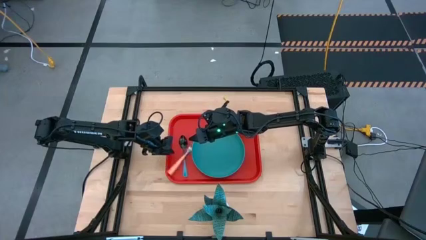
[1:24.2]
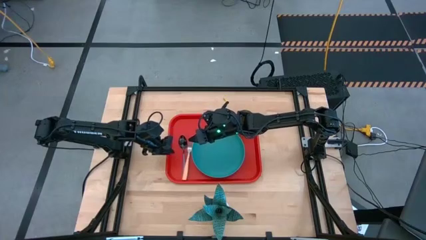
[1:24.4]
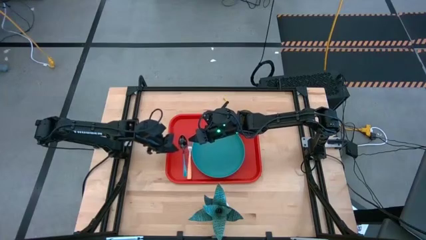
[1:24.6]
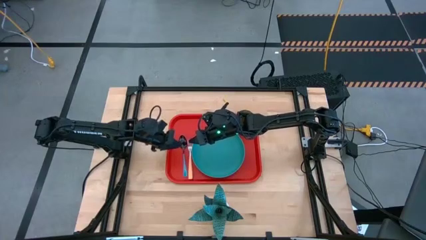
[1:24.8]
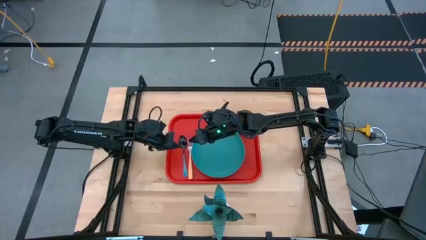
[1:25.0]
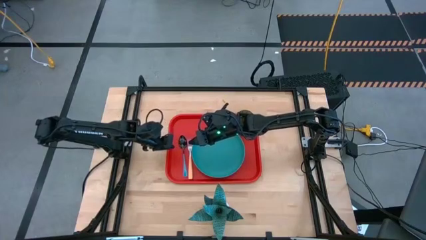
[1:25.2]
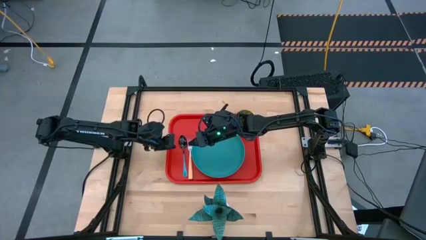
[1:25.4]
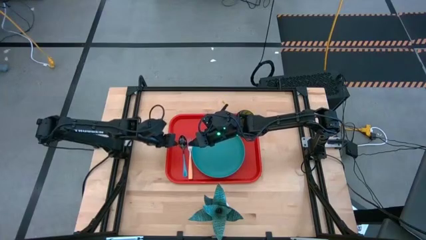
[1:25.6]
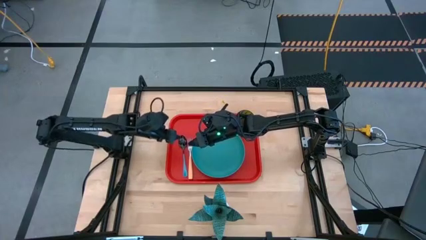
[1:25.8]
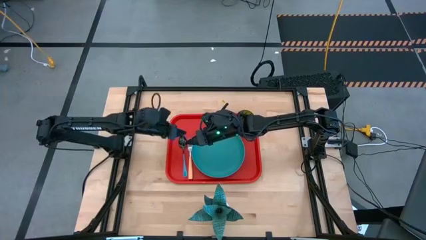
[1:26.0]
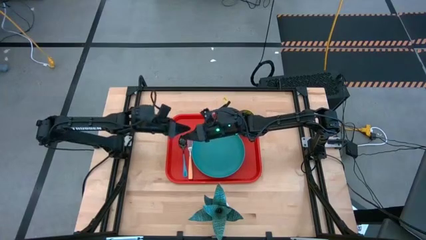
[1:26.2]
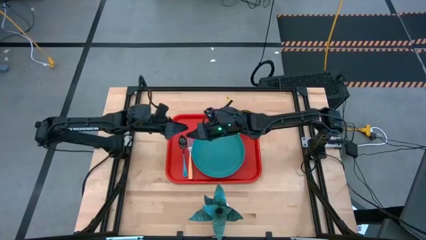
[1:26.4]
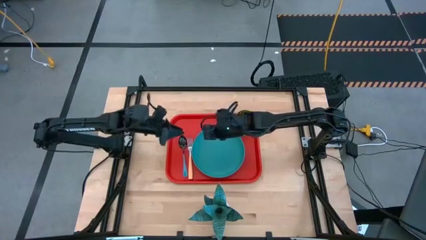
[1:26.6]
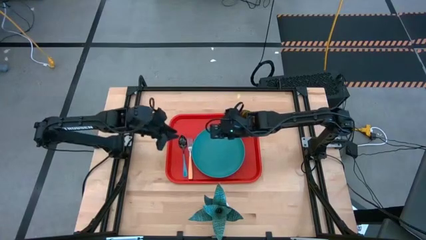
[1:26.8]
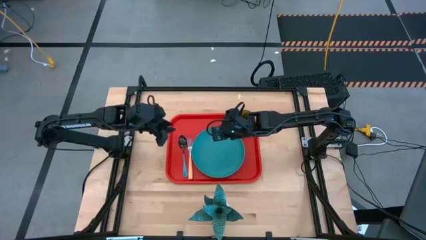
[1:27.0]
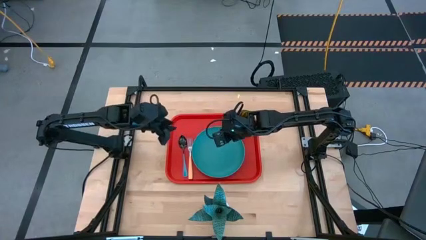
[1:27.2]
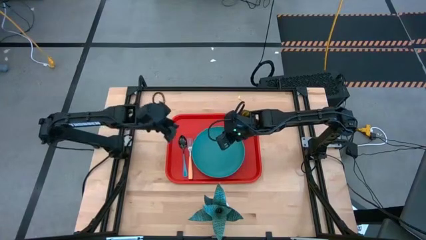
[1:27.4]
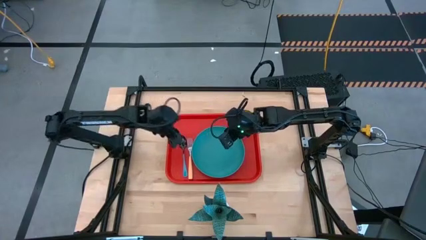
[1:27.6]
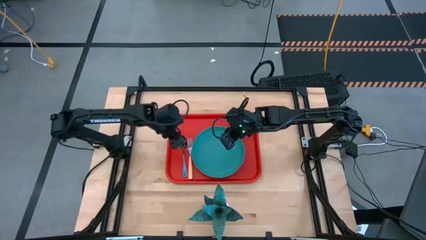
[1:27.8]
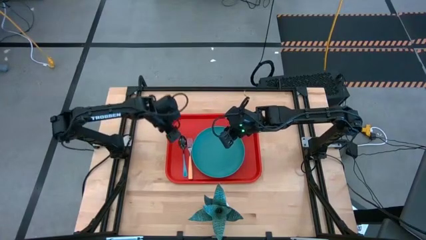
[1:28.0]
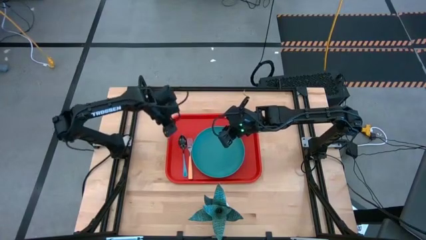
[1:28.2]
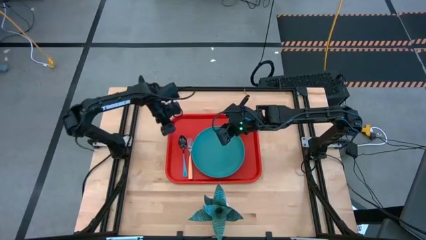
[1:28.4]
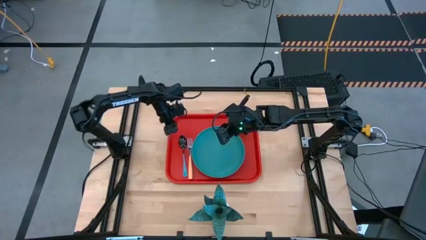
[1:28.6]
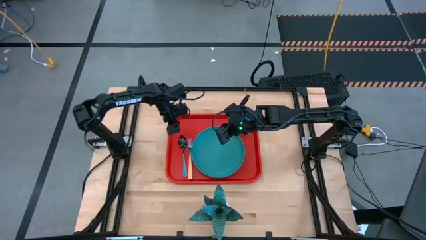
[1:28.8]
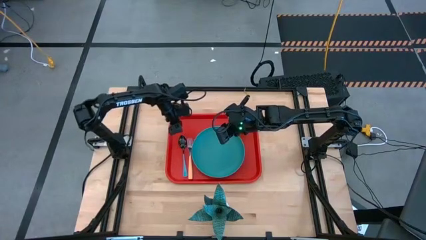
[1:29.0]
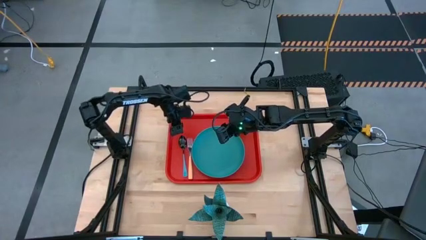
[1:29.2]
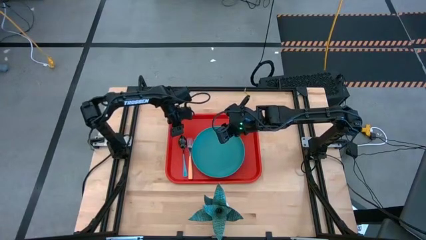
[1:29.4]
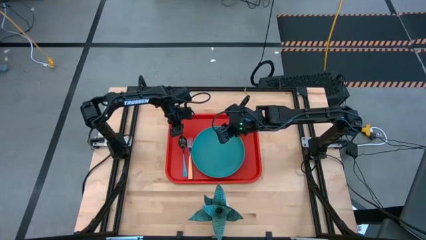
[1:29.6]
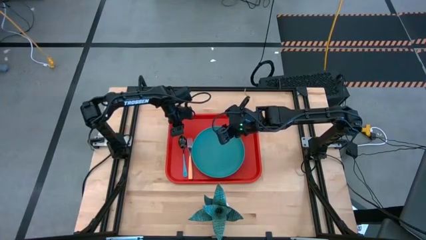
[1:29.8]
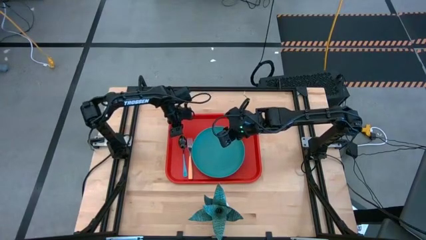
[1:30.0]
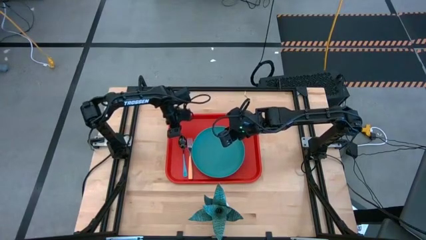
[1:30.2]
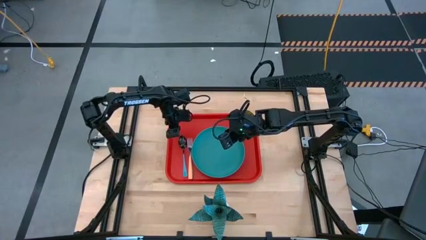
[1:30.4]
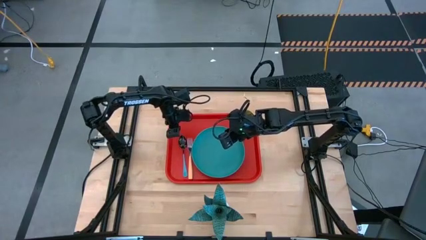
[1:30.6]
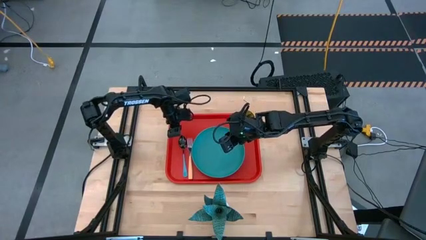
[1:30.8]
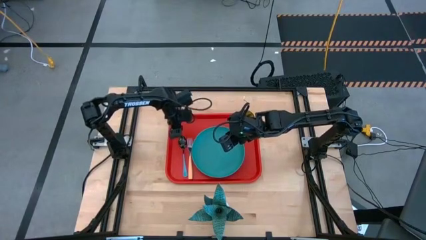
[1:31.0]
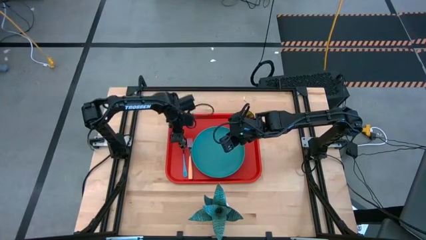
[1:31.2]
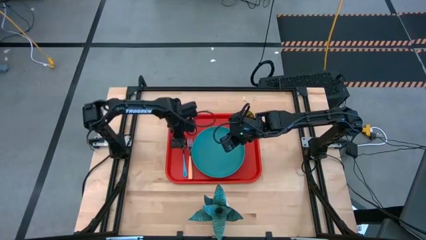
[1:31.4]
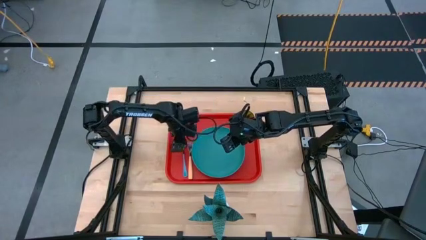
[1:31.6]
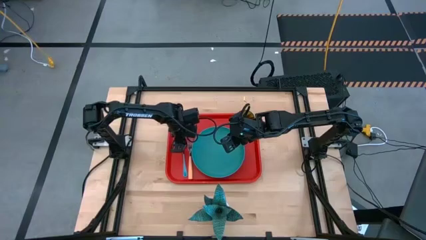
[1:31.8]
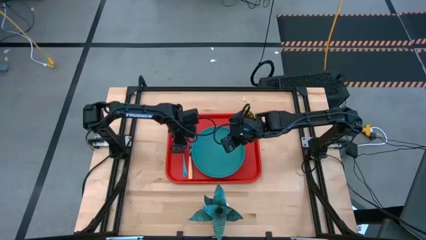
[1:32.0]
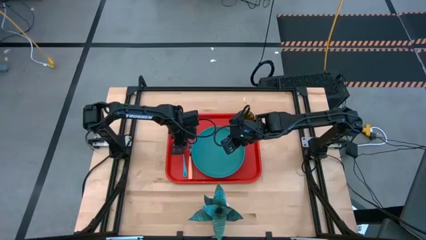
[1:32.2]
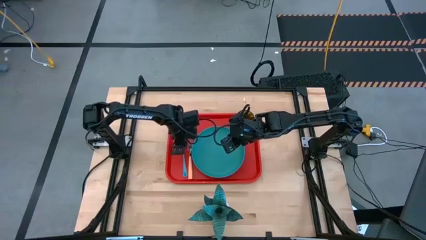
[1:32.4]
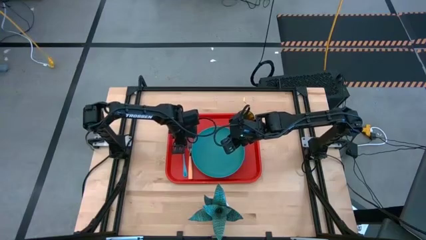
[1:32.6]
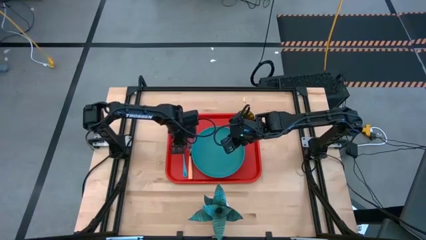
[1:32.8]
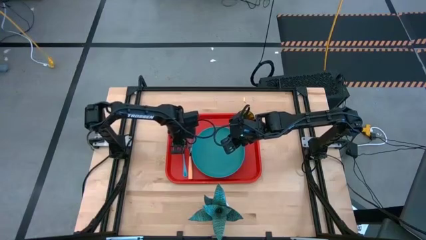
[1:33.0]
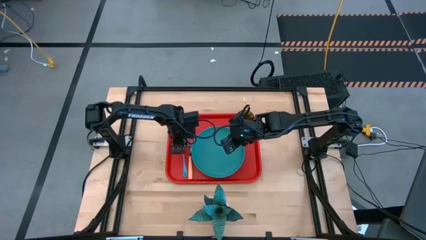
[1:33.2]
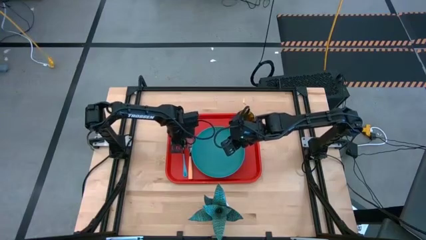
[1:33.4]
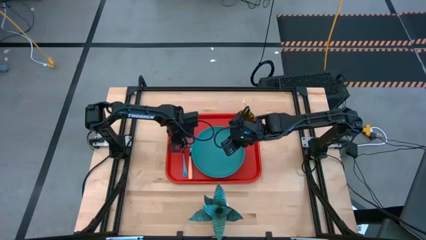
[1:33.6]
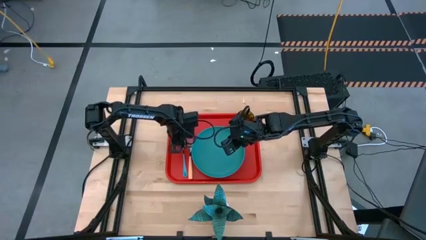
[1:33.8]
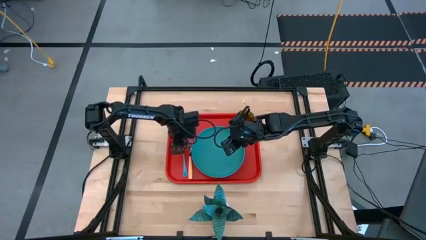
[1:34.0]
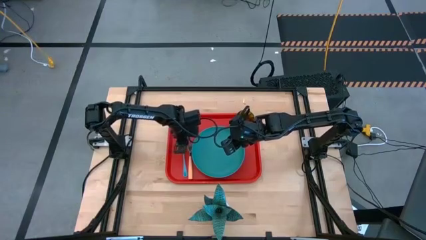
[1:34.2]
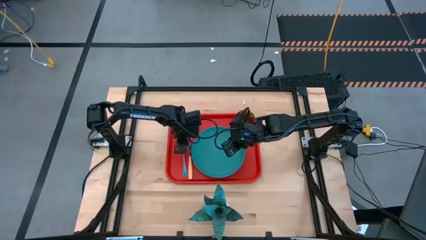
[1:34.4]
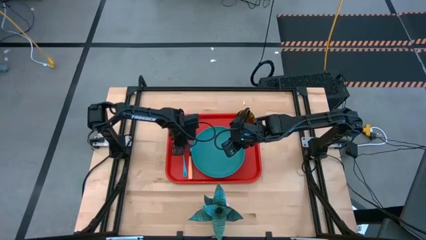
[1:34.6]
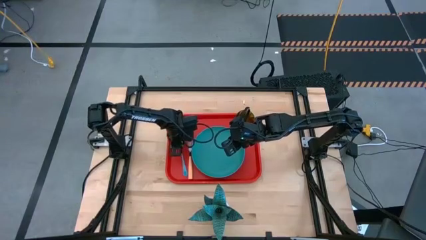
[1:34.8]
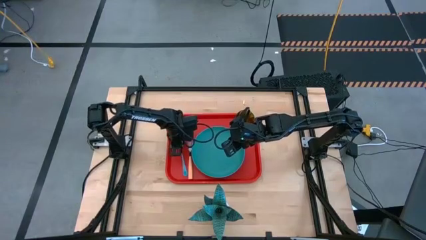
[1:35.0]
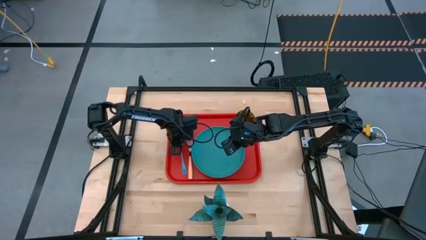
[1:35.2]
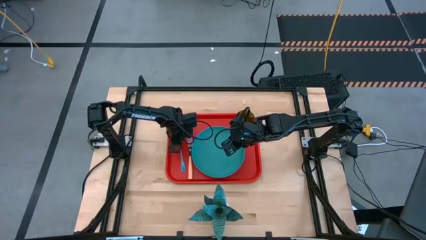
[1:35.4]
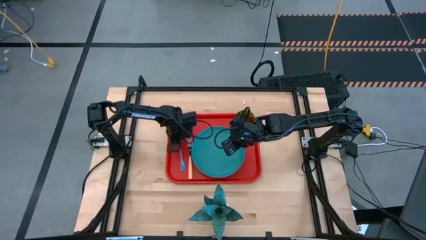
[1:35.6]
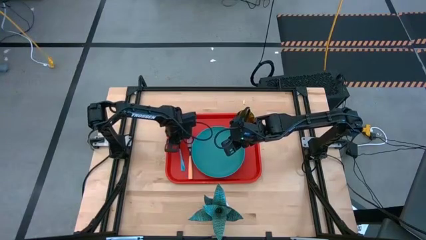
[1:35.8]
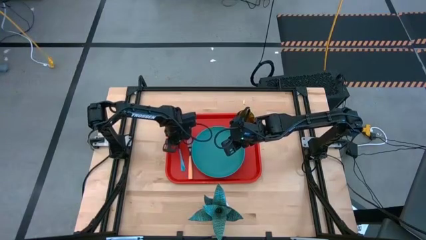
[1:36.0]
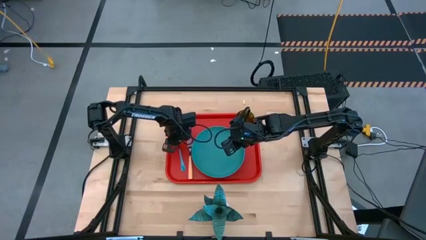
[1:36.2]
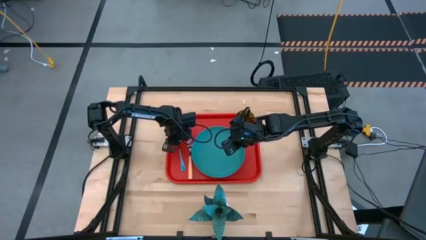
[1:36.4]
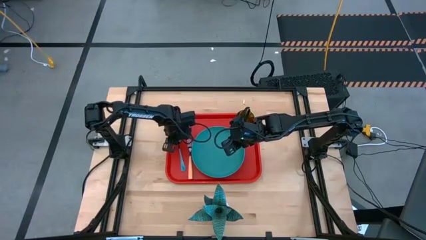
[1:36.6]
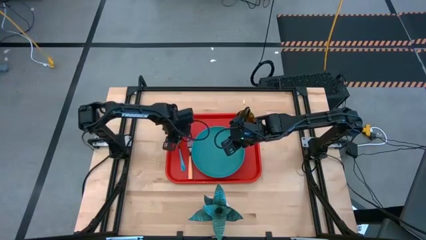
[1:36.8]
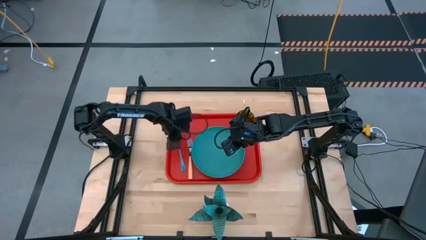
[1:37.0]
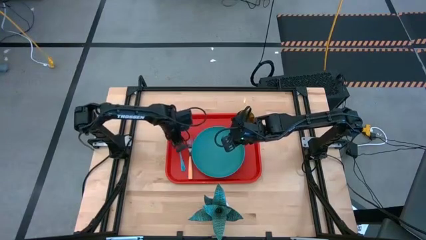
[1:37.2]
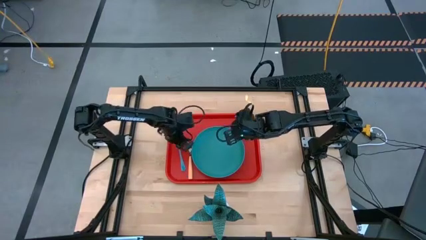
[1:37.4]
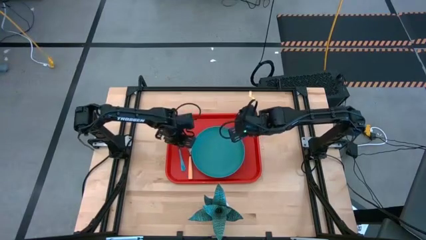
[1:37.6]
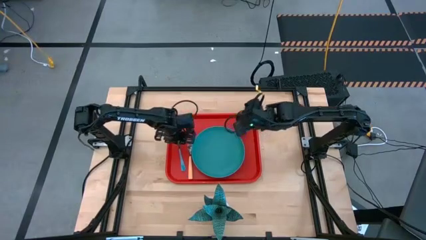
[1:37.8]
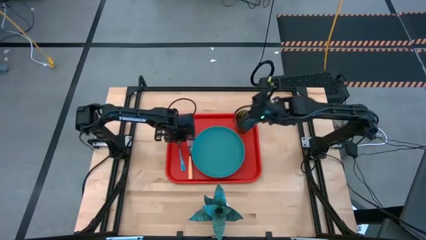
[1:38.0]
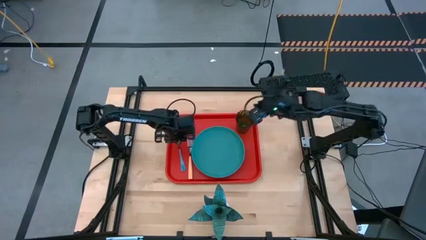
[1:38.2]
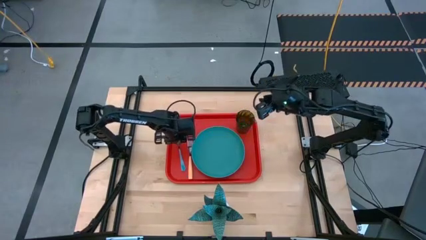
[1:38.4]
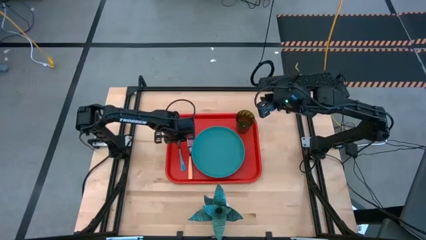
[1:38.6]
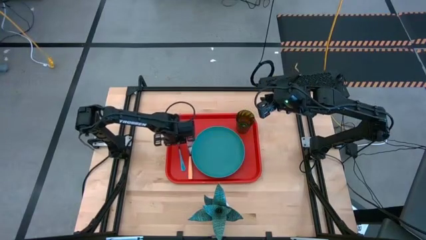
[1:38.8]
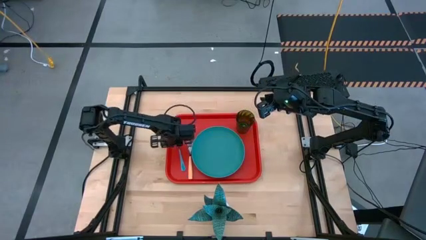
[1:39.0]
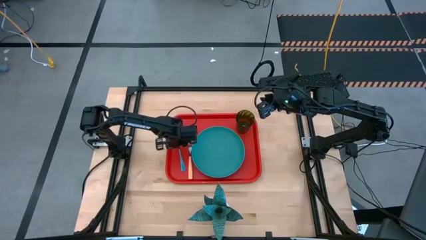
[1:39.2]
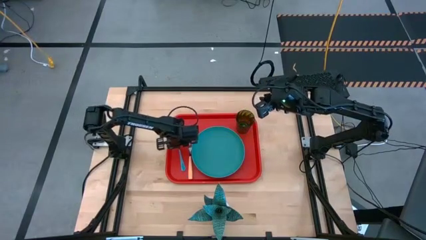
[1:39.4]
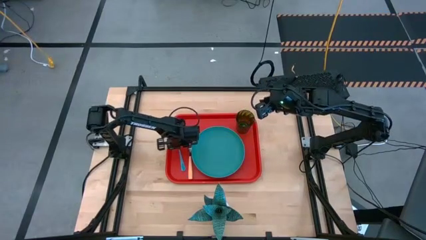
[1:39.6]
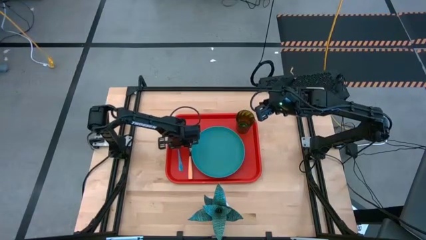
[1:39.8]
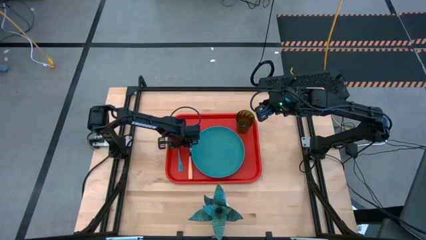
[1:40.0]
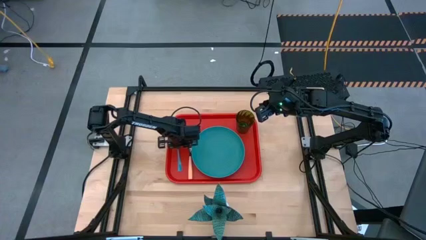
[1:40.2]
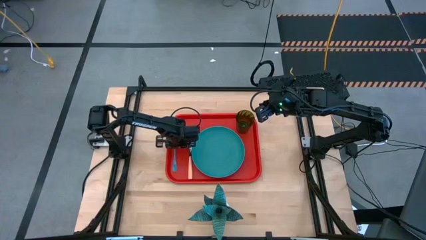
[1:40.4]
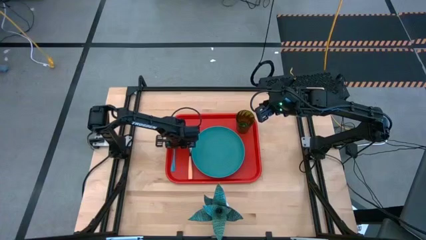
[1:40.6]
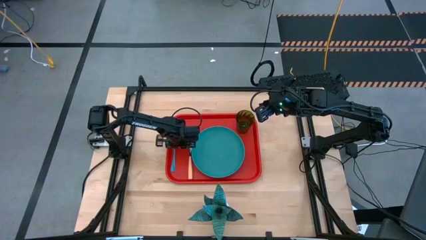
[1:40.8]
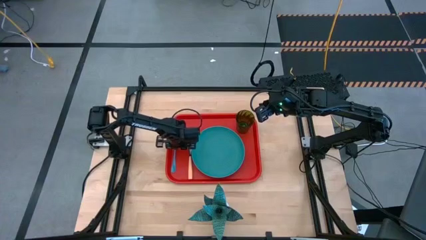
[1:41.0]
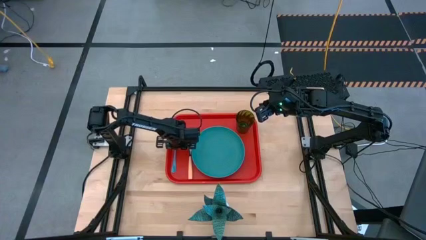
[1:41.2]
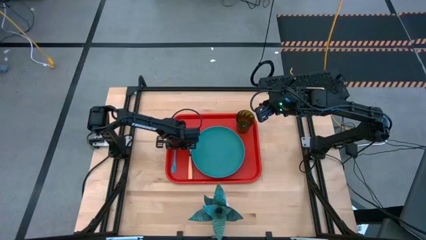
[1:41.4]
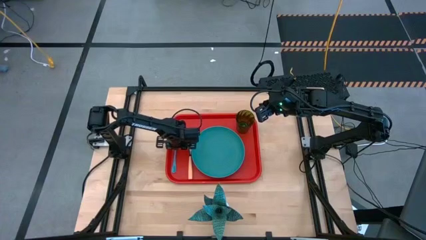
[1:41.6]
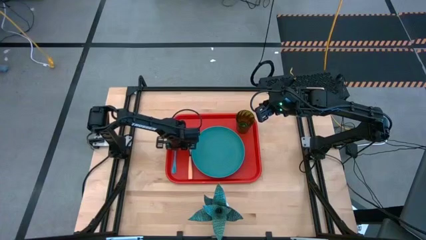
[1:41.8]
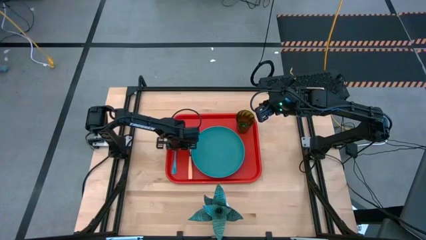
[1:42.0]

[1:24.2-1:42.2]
Task: Pick and place plate/cup/fork/spoon on tray
Adjust the green spoon on the orange tray
